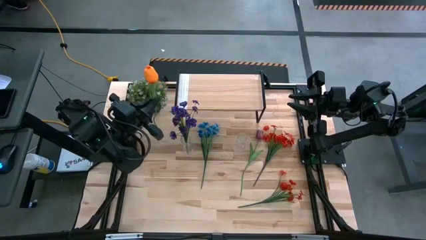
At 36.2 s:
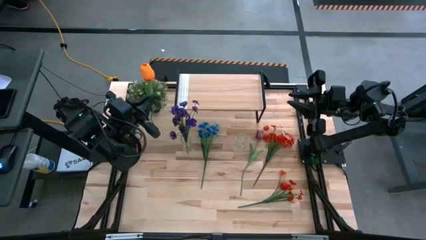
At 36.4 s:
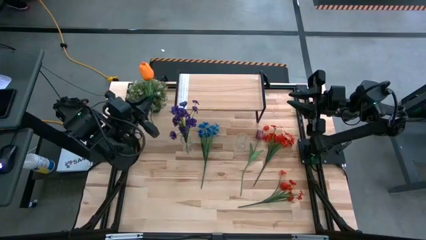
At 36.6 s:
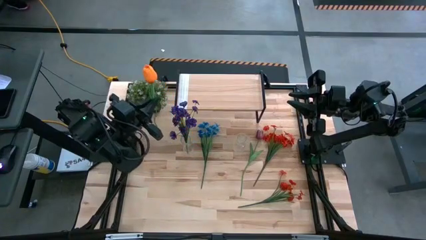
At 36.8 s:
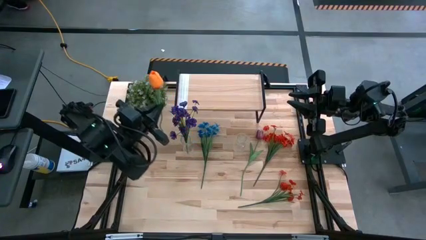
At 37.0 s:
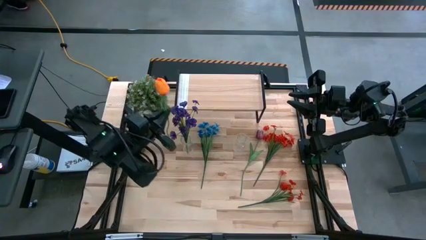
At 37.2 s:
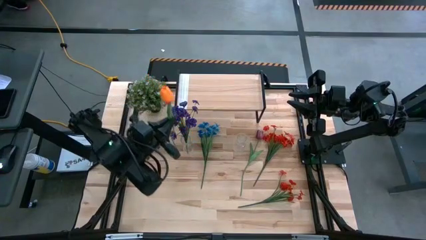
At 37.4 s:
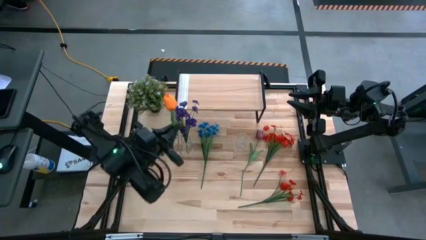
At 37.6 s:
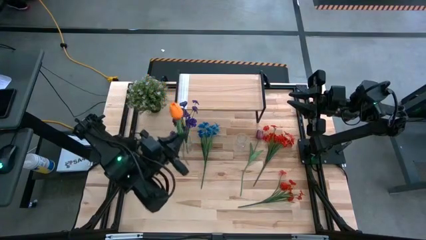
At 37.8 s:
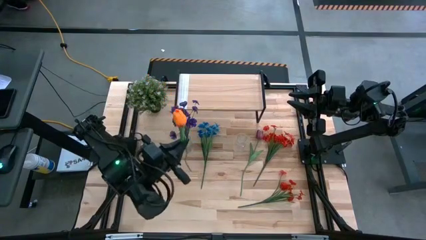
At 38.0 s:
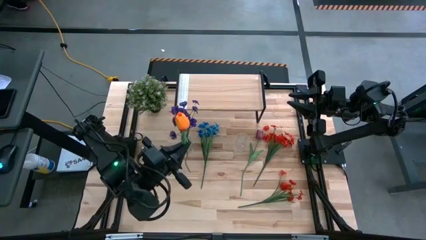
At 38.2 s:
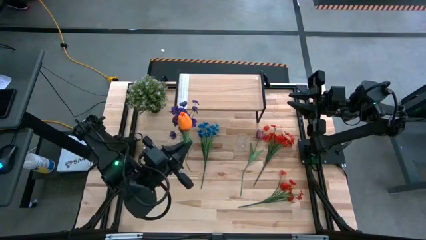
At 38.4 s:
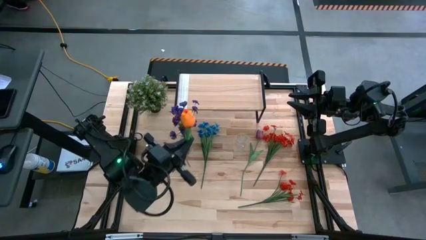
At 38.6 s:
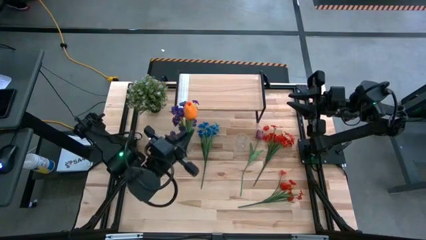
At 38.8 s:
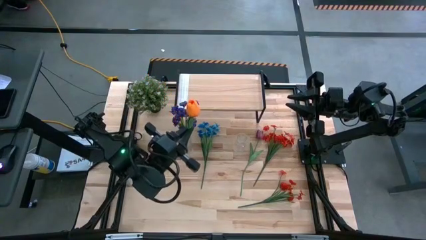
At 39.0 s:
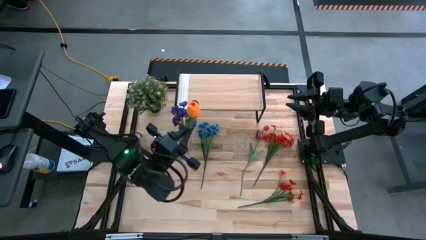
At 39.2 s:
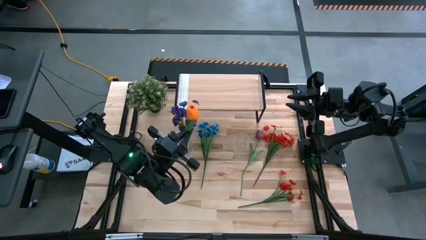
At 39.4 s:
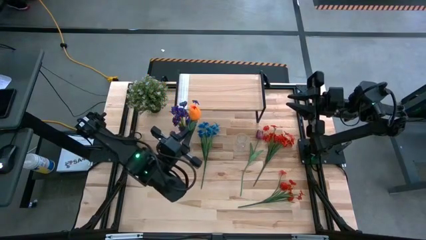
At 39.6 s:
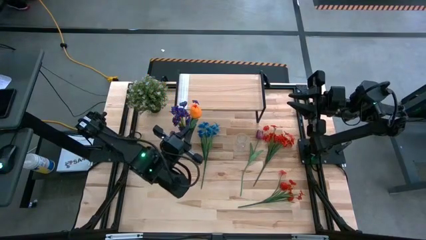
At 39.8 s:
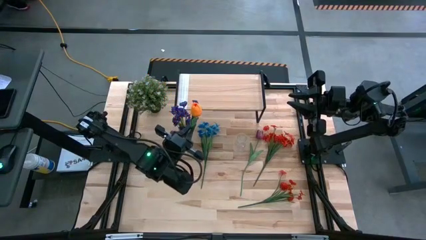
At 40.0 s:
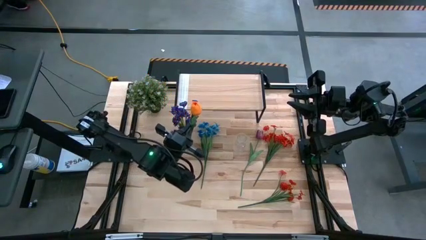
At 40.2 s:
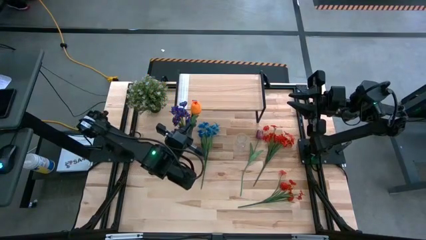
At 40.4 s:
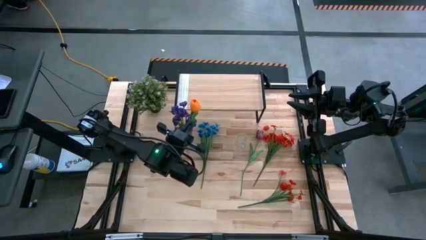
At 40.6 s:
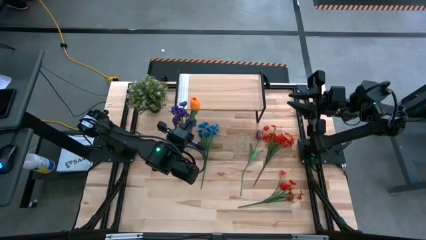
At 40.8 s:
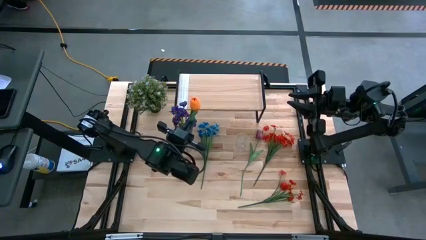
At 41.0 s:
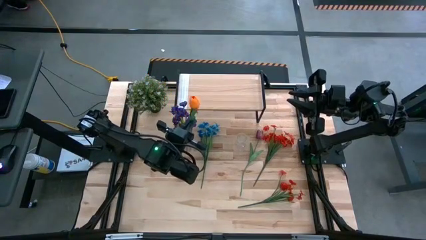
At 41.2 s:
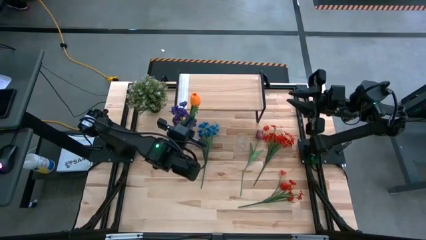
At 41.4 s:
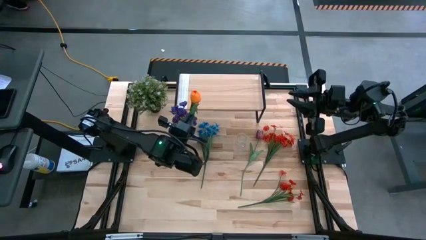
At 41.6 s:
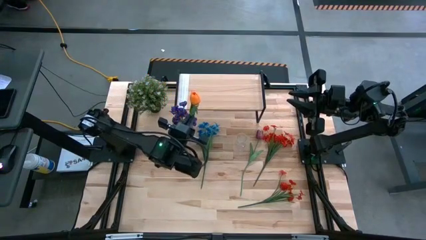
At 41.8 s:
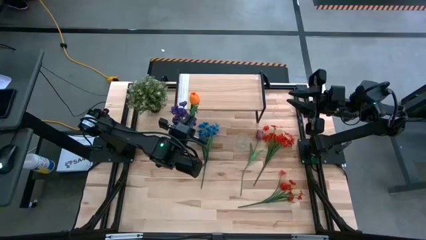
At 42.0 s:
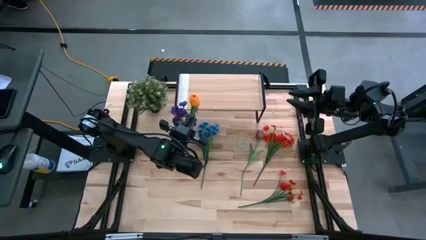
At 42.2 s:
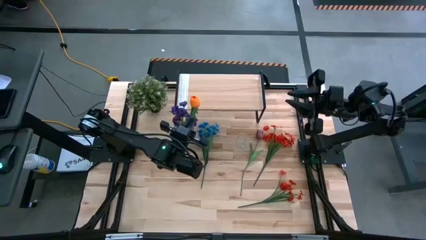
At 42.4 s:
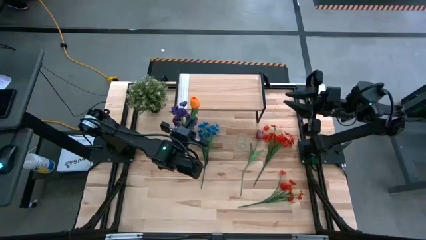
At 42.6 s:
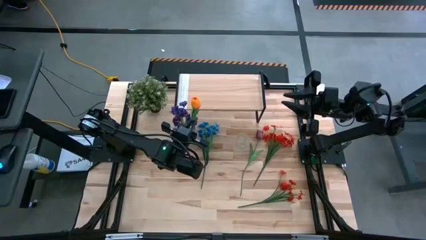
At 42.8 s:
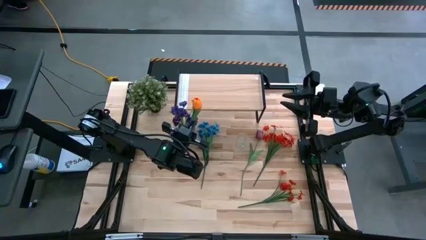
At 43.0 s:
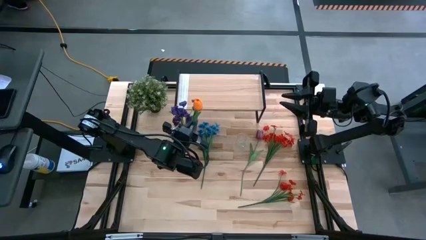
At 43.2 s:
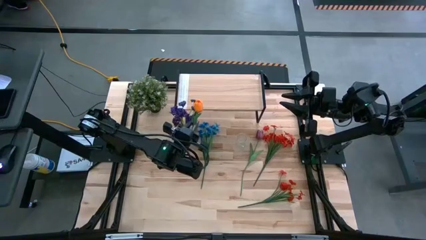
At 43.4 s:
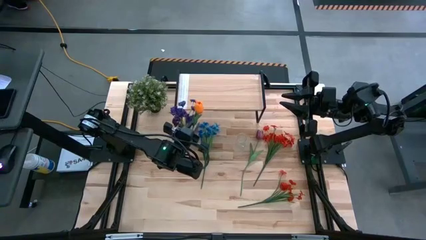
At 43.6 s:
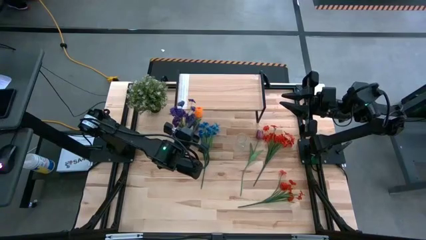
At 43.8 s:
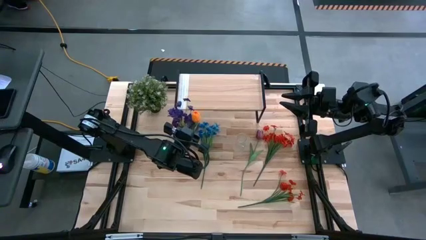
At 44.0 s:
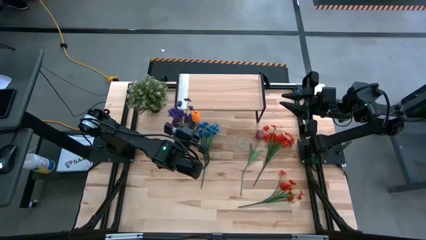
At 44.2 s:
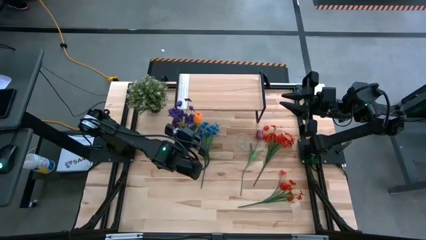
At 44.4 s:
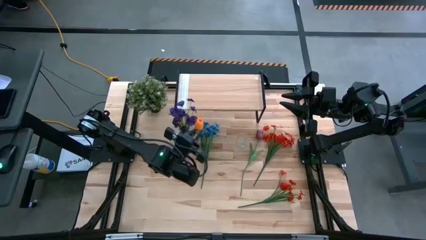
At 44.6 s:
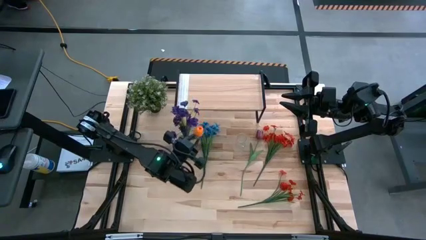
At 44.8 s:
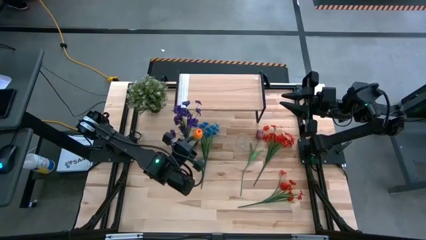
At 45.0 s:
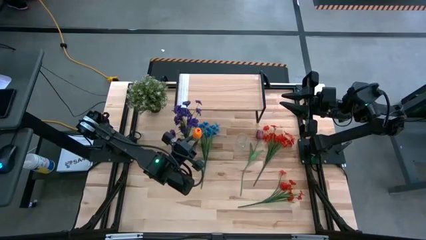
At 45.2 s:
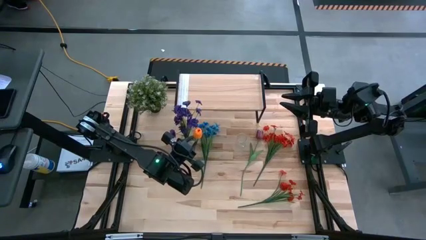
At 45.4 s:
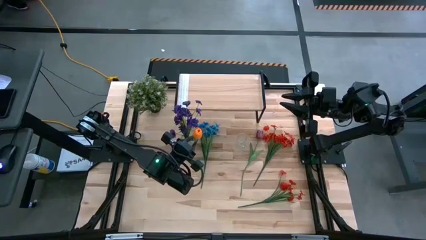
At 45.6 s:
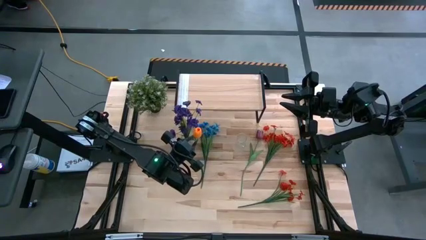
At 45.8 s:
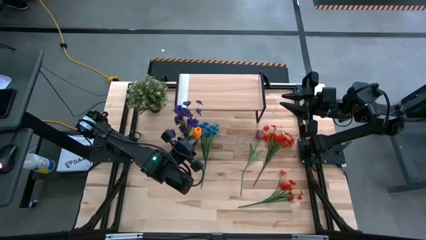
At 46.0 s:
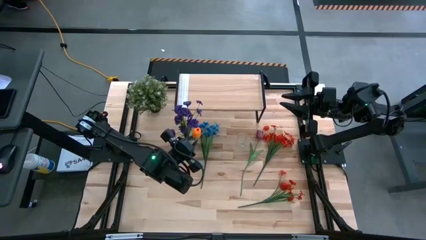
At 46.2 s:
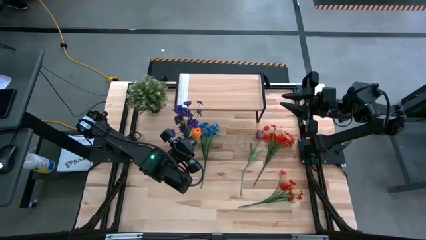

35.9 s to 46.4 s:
Task: Pick and place flowers into a vace then onto a shelf
Put the orange tulip into the left transparent vase
